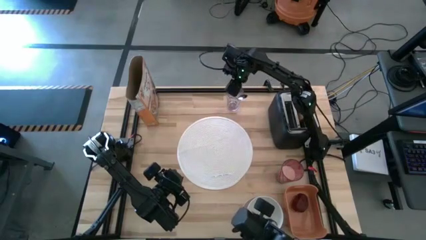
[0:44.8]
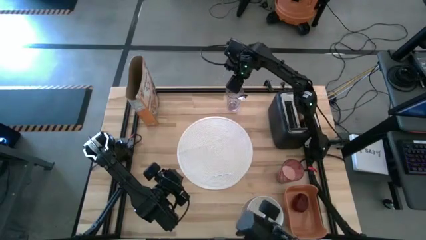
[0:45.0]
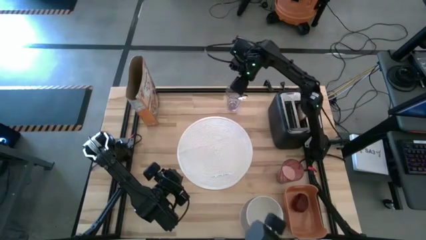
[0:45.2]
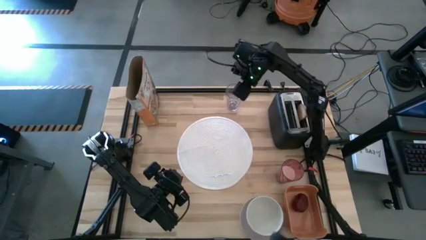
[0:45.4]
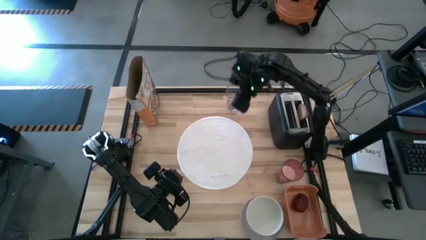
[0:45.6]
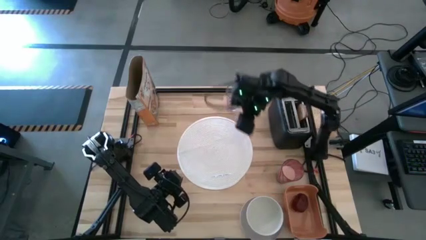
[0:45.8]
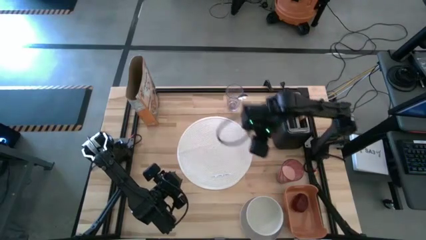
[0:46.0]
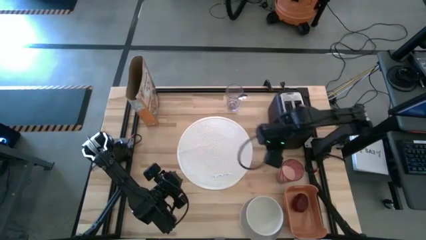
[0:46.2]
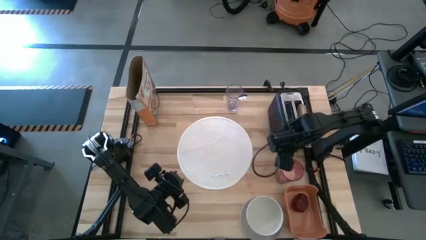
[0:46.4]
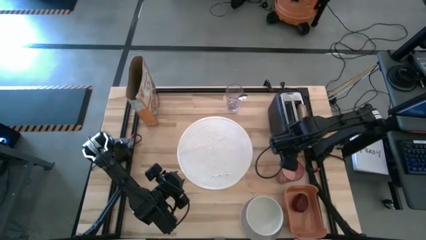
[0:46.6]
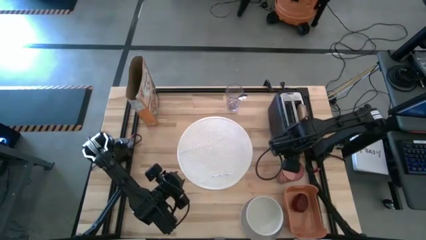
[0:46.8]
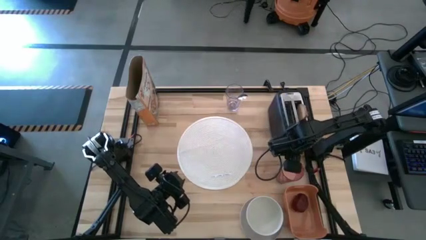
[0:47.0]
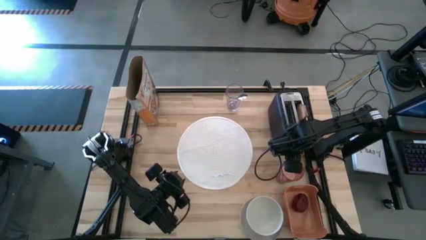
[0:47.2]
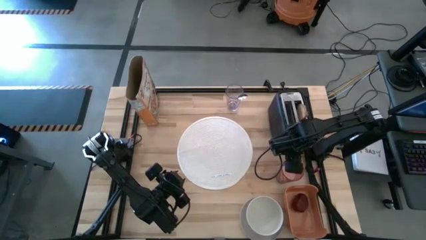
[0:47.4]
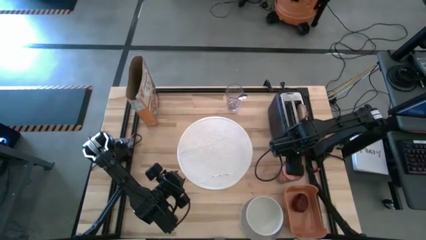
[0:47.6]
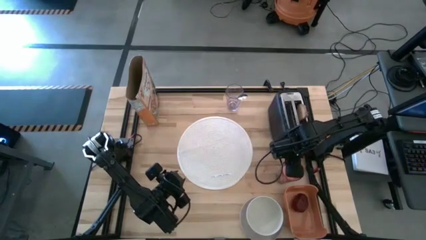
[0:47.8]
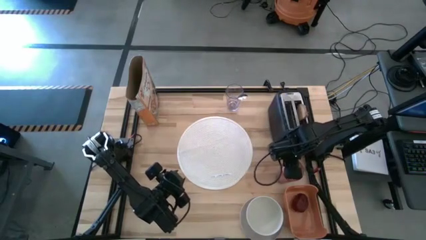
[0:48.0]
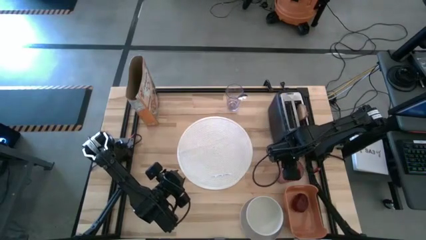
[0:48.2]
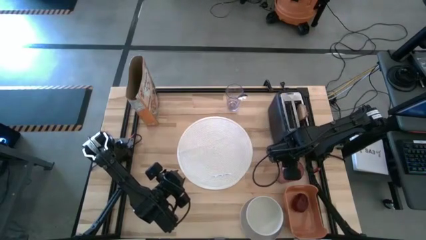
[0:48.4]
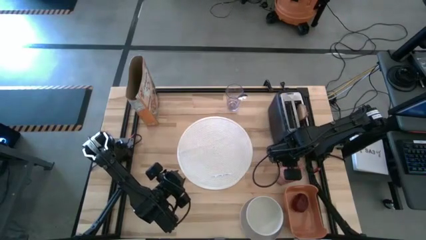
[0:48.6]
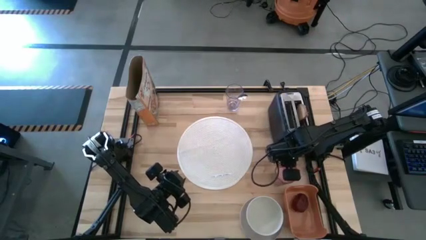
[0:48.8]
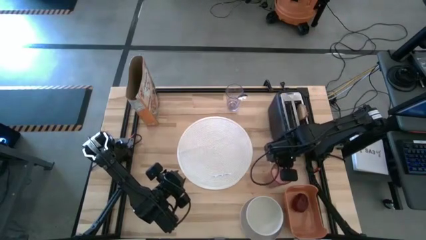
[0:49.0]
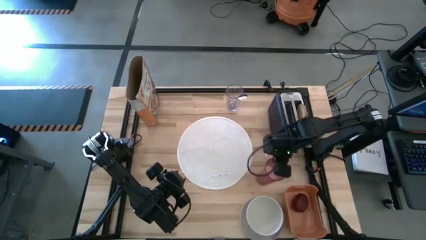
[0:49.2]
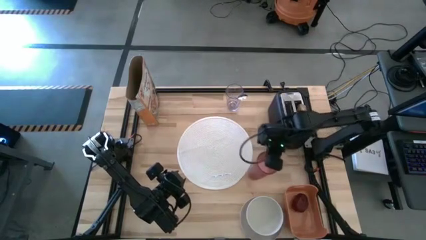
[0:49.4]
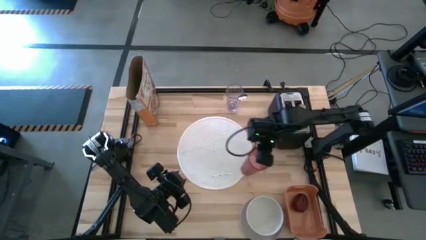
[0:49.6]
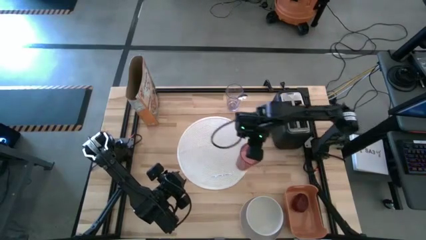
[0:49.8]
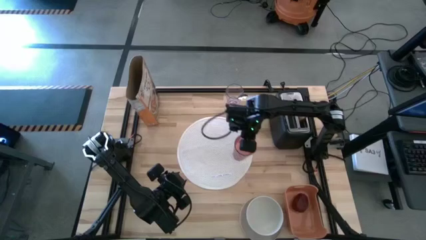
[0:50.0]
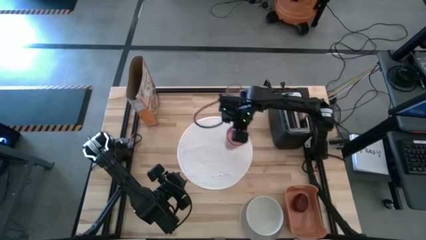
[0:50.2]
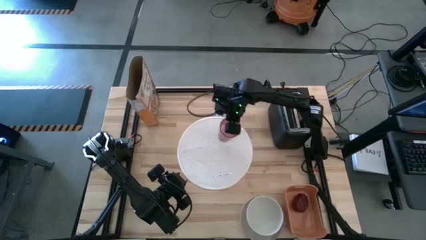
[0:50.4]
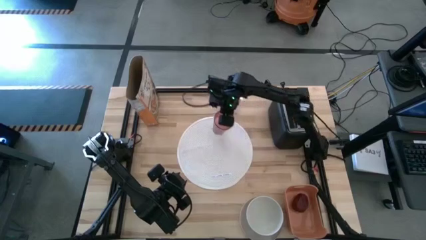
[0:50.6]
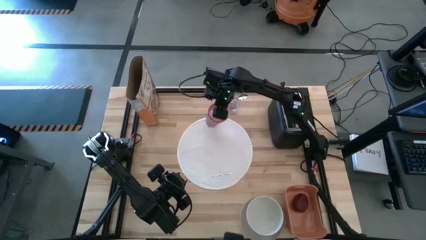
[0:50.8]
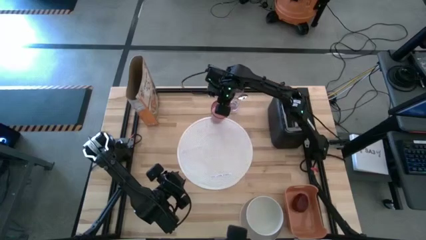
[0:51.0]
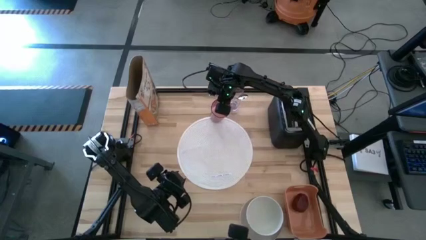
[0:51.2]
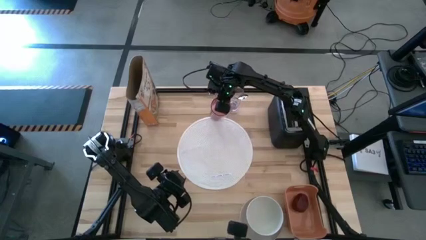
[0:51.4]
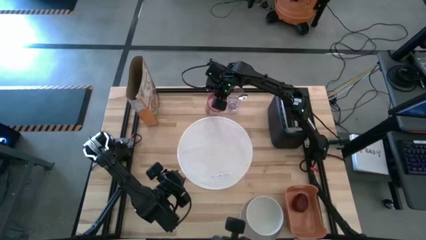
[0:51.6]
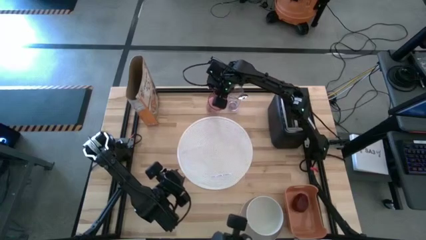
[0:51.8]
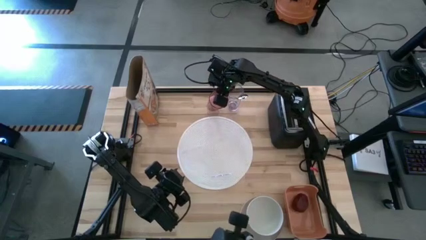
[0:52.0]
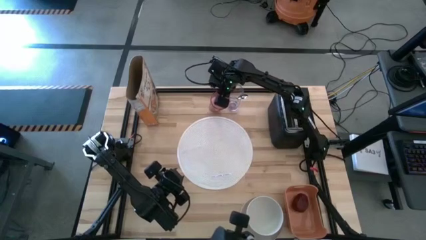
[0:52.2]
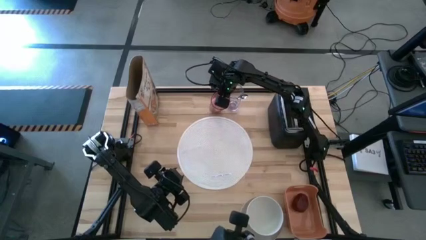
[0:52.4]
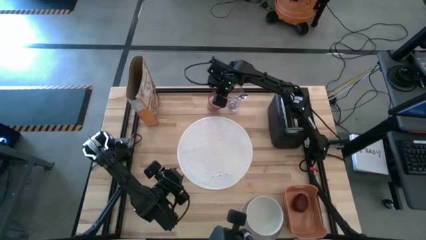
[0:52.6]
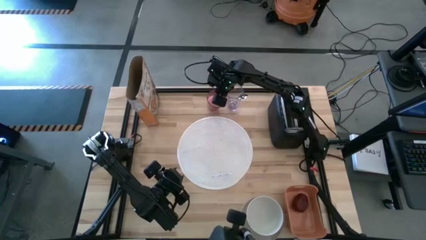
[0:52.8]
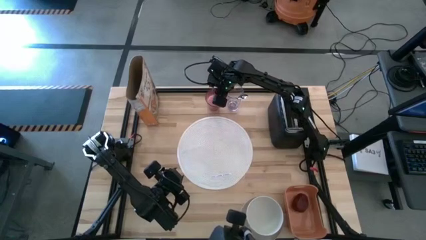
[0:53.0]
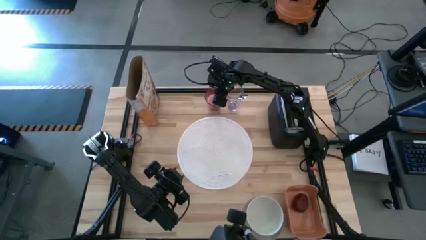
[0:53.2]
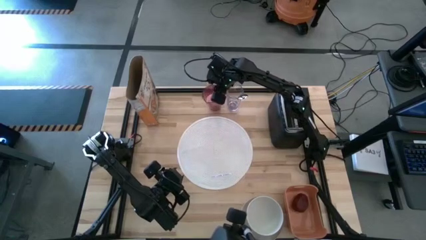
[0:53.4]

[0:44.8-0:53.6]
Task: Arrange a breakfast setting
Move the pink cup to the top middle left of the table

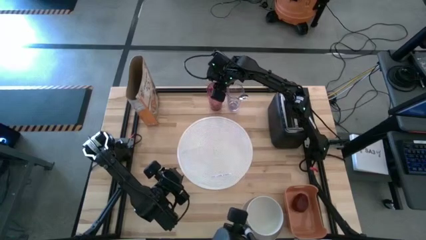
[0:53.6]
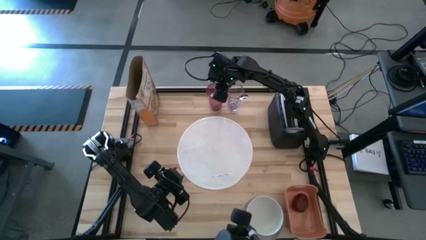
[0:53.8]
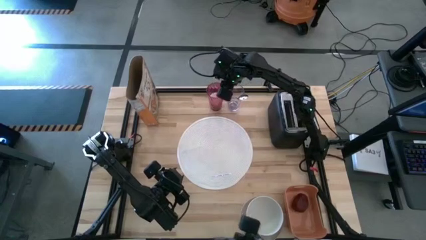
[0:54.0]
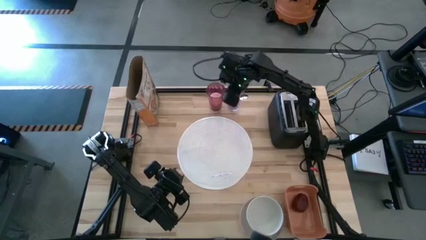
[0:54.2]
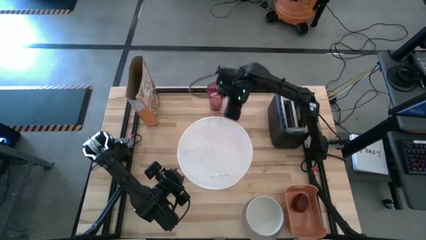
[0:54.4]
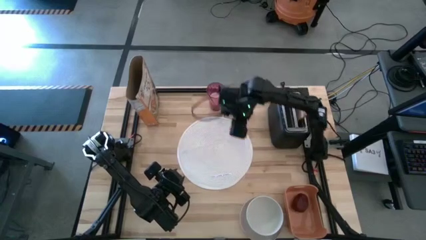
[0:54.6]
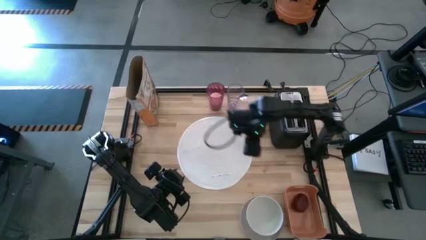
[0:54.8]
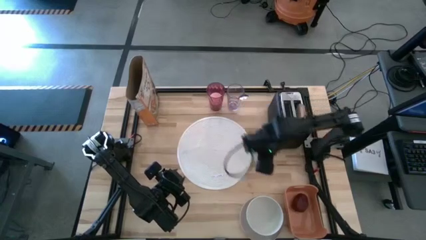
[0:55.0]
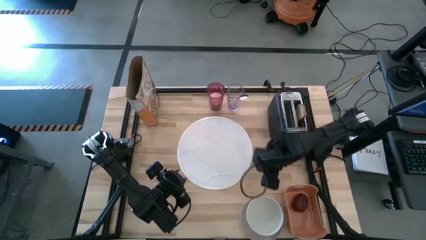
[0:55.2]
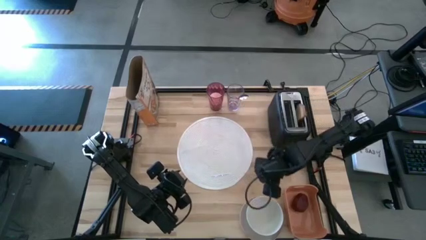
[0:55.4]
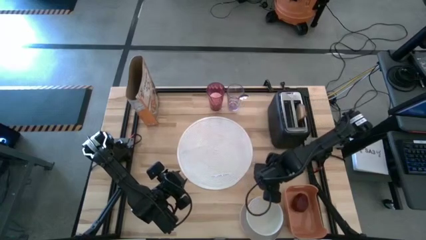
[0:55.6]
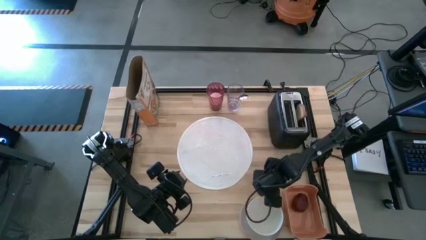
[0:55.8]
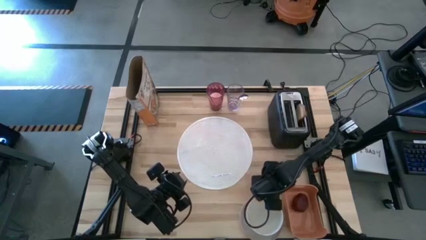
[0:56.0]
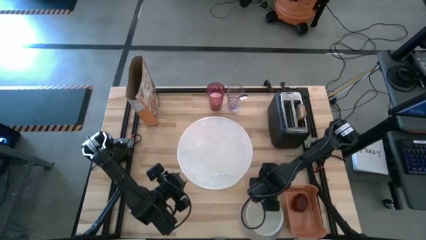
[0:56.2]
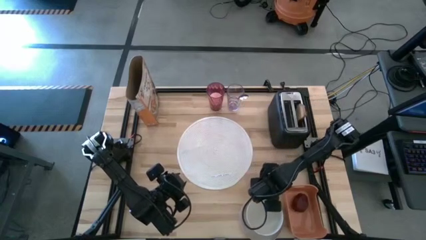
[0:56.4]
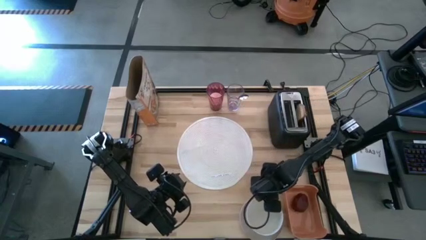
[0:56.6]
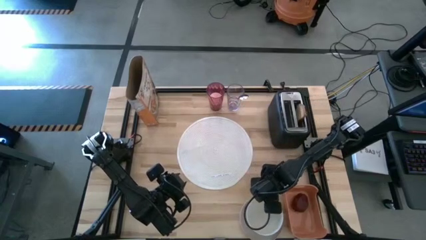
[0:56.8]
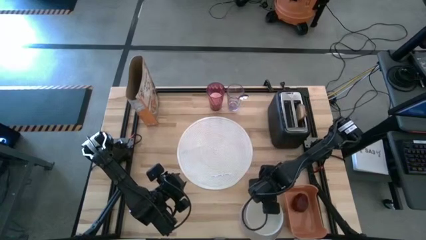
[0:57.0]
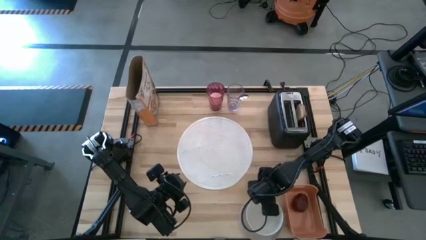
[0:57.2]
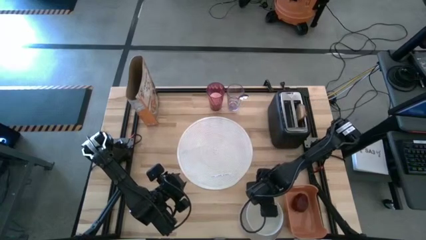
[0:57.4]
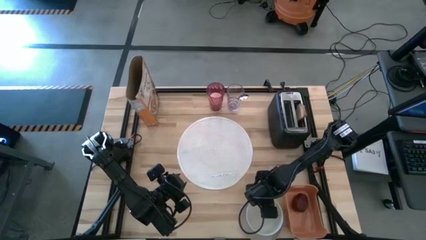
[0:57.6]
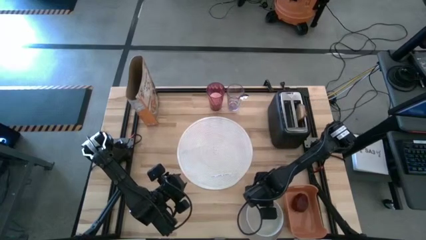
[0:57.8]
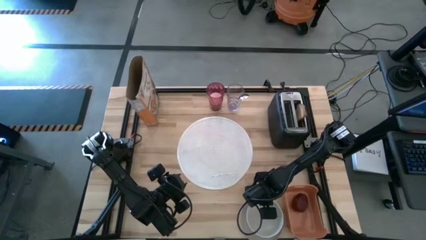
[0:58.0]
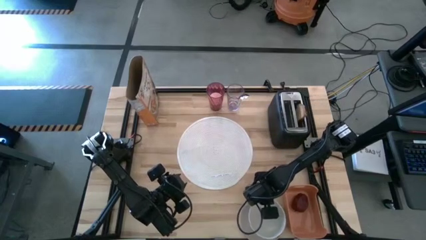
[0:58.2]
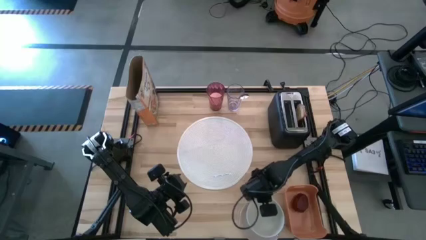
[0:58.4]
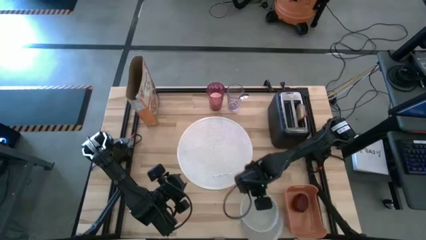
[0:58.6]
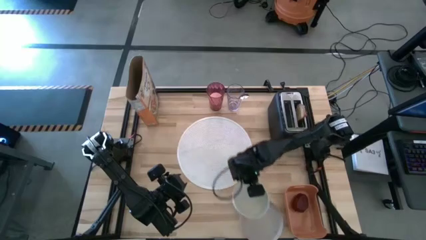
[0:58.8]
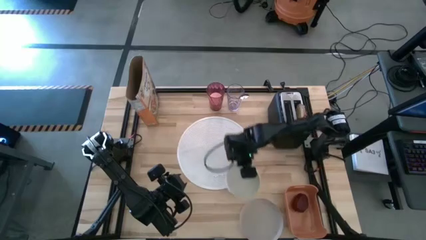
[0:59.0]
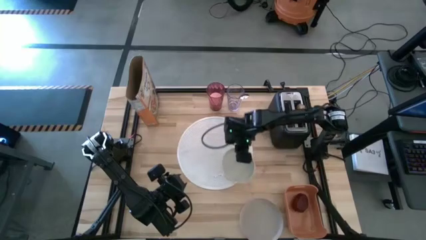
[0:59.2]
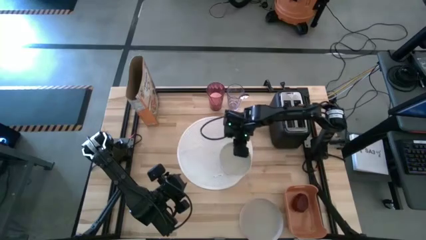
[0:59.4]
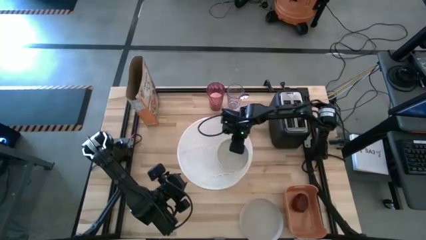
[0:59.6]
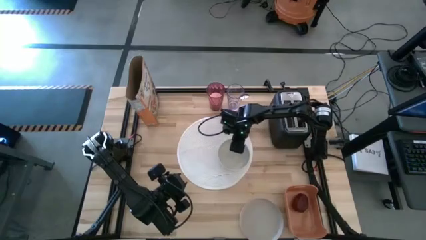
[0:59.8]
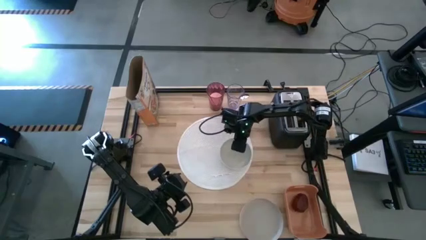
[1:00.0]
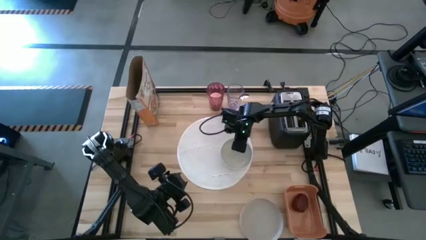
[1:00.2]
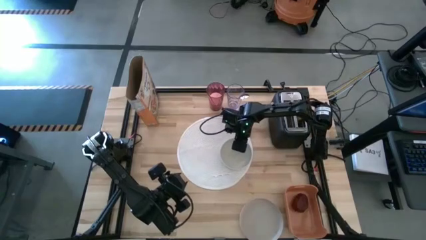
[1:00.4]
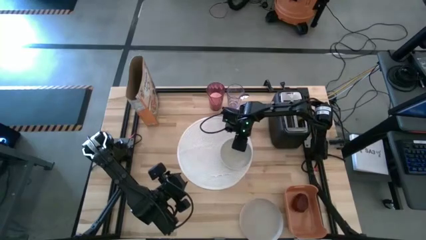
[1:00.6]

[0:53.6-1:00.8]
Put the white bowl on the white placemat

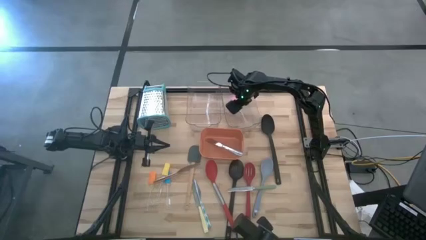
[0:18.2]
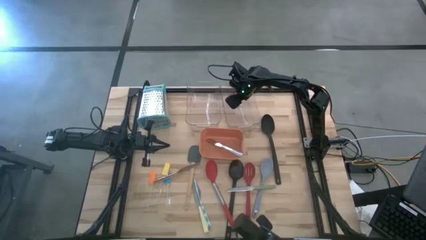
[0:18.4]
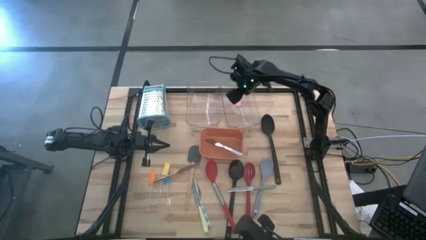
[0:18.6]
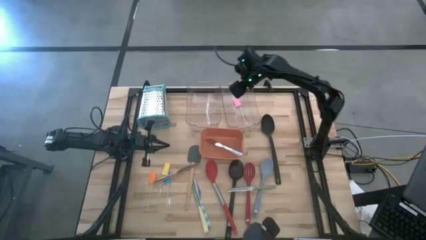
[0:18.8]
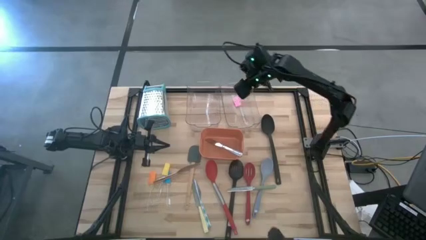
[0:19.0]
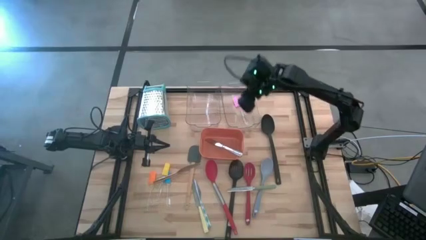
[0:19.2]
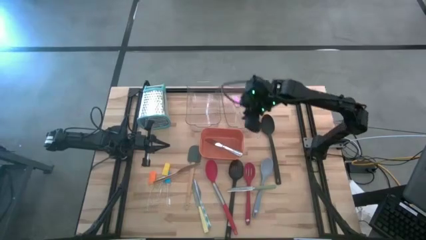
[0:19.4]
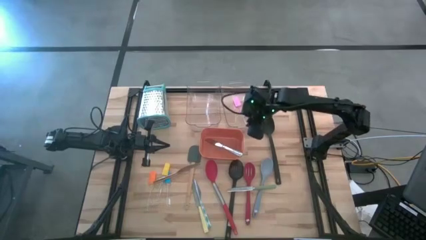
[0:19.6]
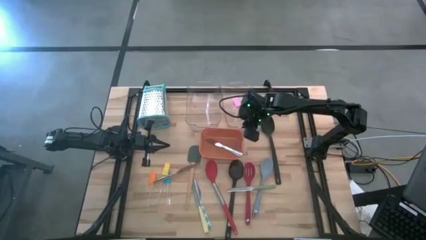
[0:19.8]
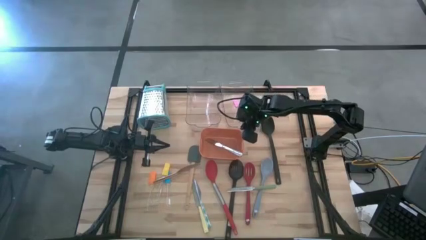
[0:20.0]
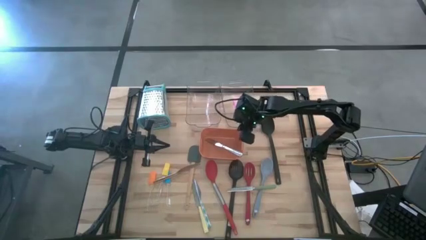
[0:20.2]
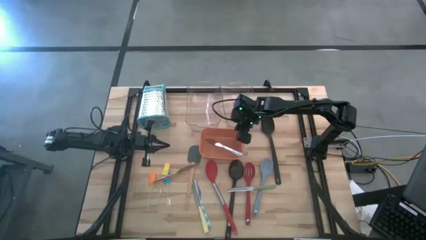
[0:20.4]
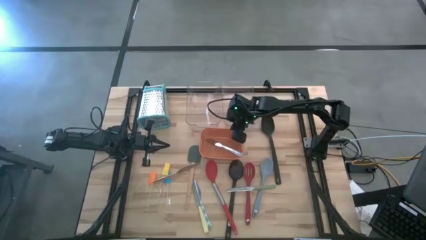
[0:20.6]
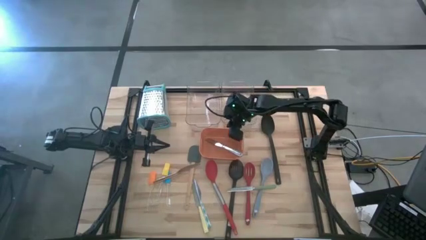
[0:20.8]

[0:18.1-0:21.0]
Task: Pick & Place Kitchen Items
Adjust the right transparent bin
